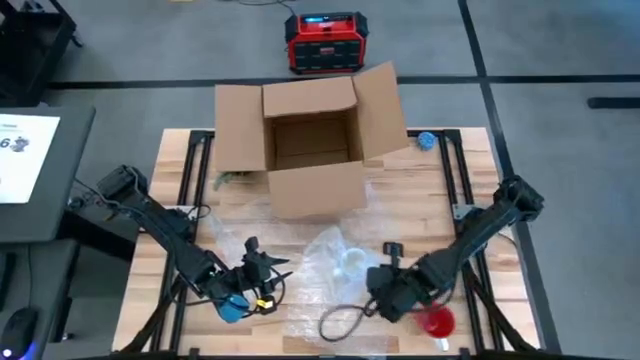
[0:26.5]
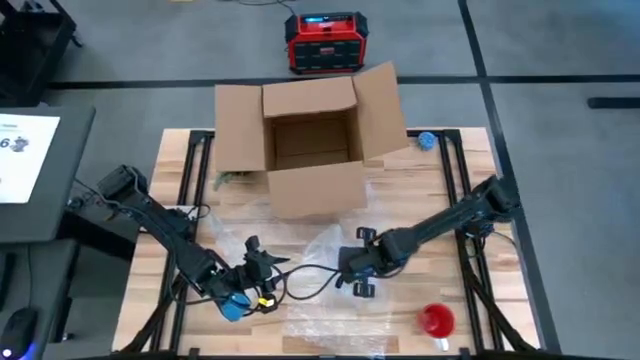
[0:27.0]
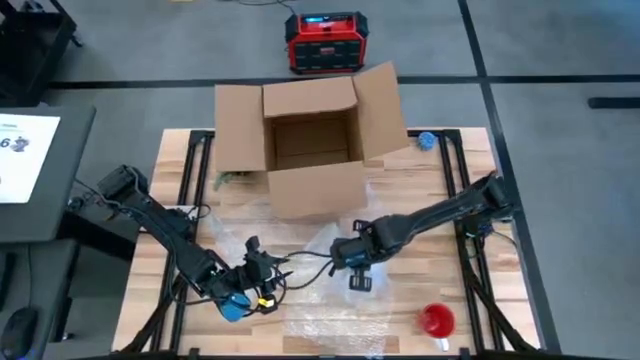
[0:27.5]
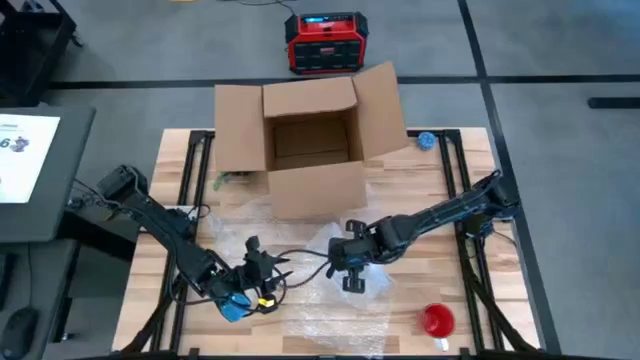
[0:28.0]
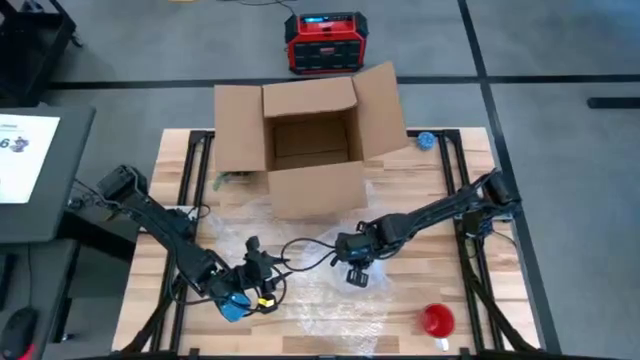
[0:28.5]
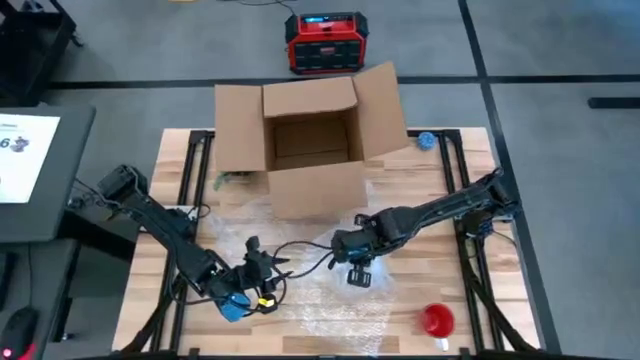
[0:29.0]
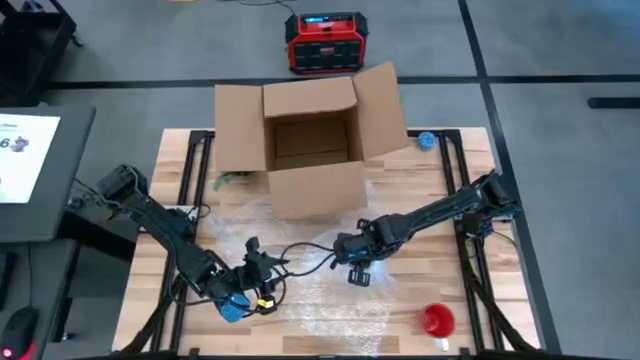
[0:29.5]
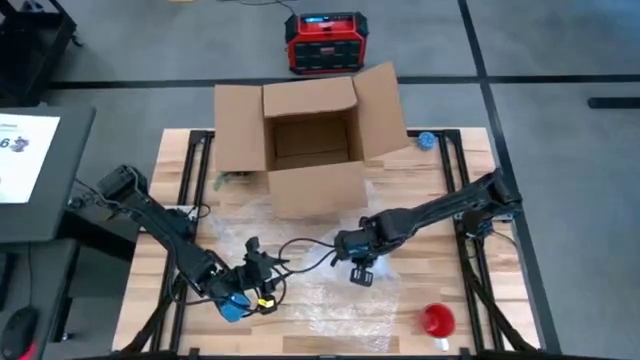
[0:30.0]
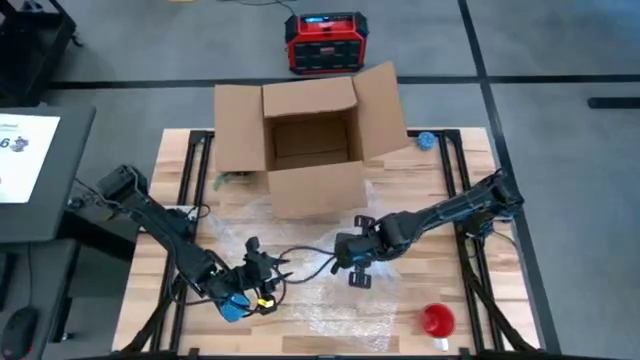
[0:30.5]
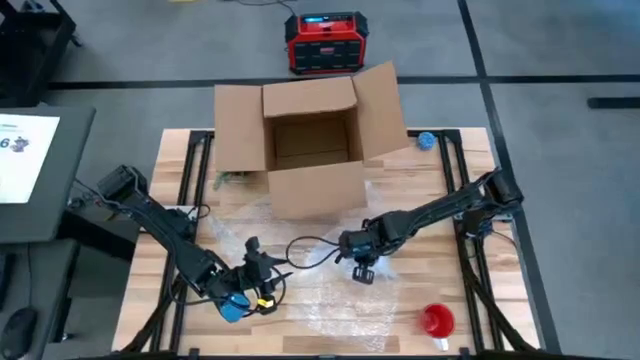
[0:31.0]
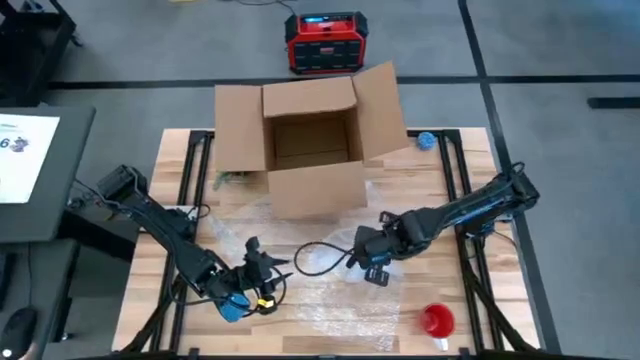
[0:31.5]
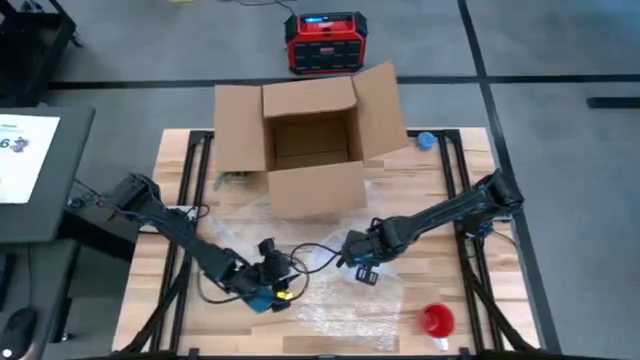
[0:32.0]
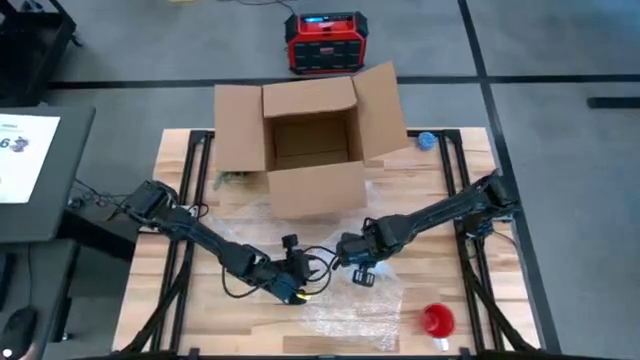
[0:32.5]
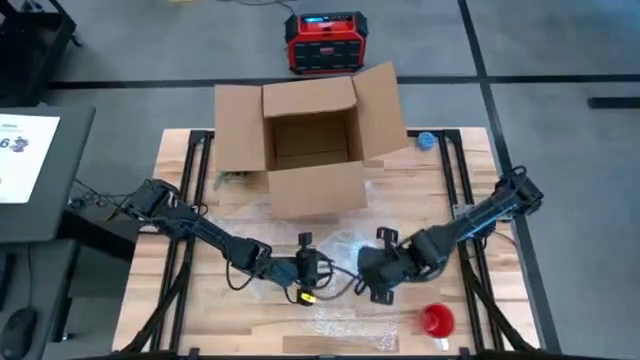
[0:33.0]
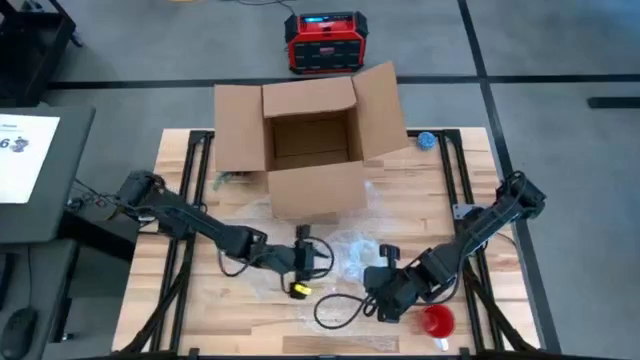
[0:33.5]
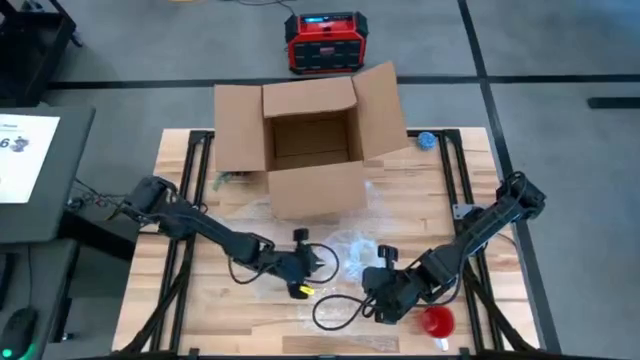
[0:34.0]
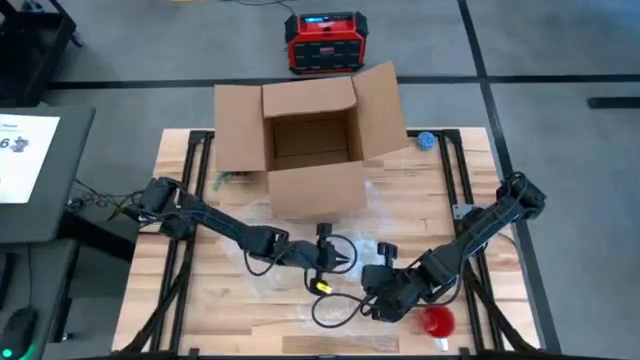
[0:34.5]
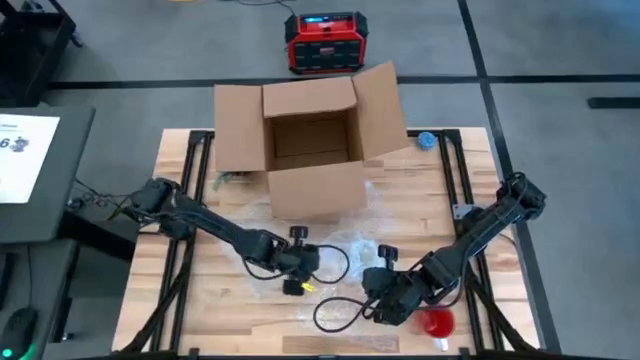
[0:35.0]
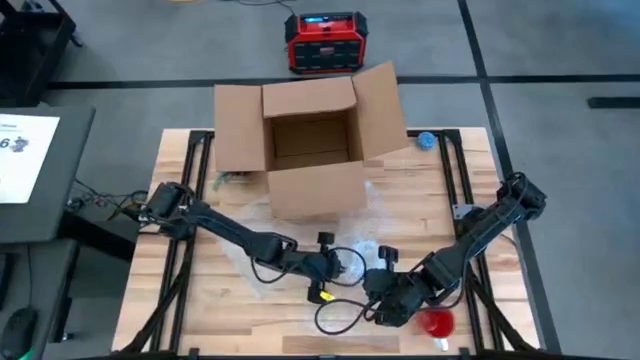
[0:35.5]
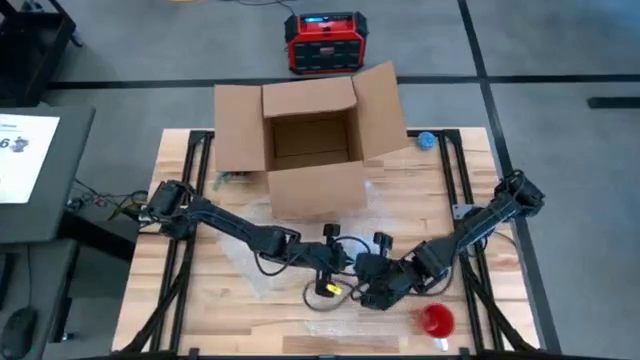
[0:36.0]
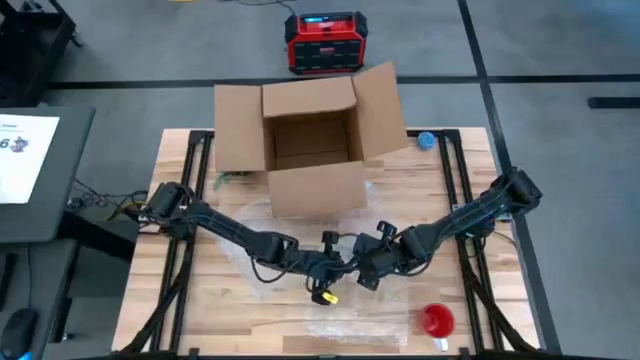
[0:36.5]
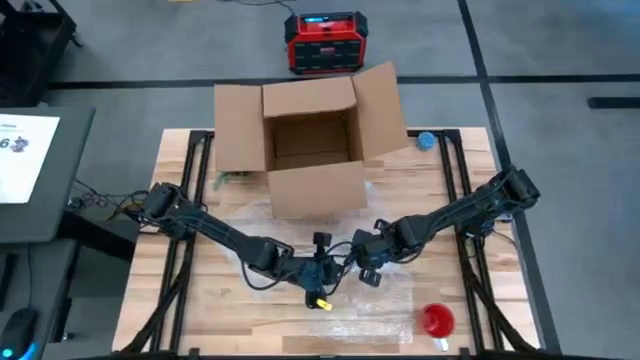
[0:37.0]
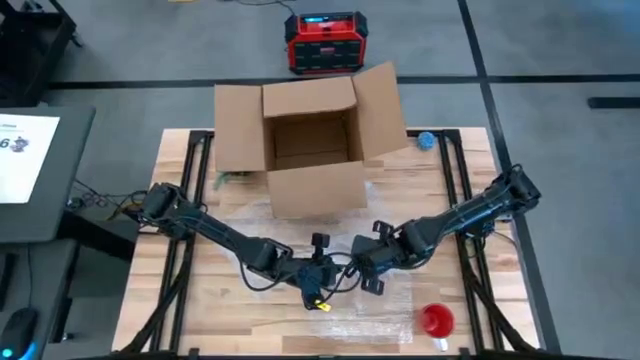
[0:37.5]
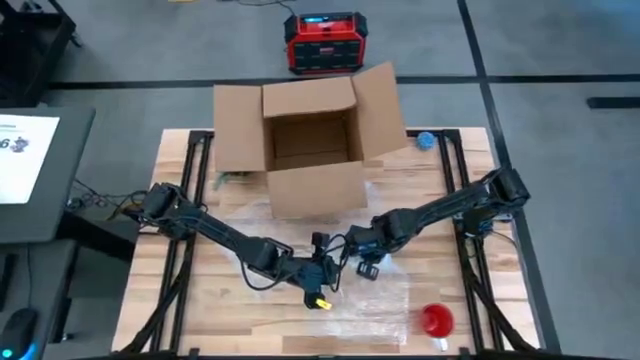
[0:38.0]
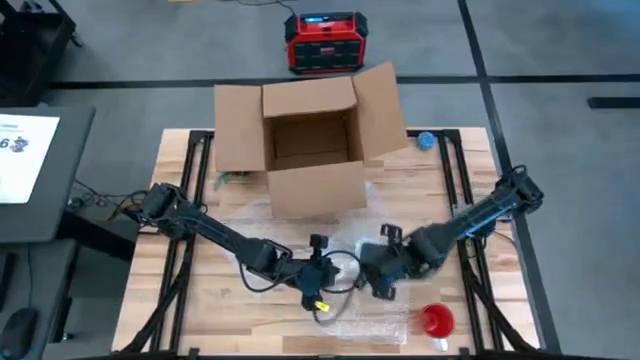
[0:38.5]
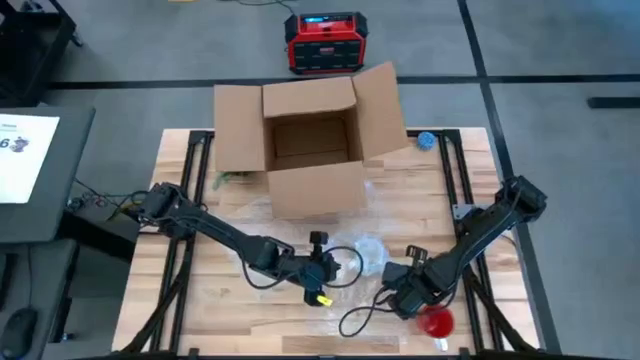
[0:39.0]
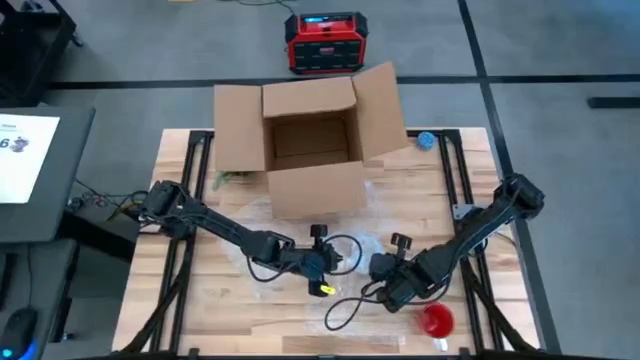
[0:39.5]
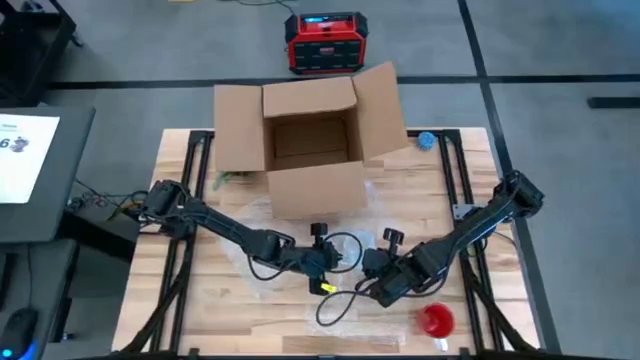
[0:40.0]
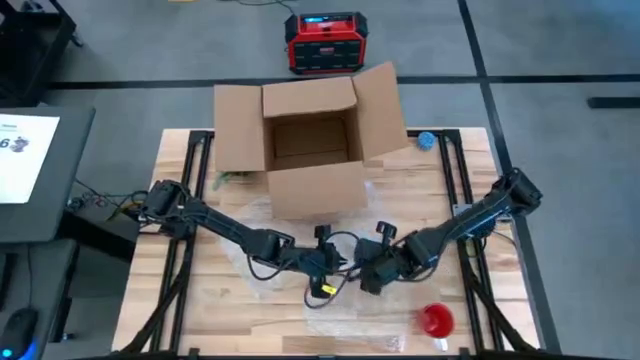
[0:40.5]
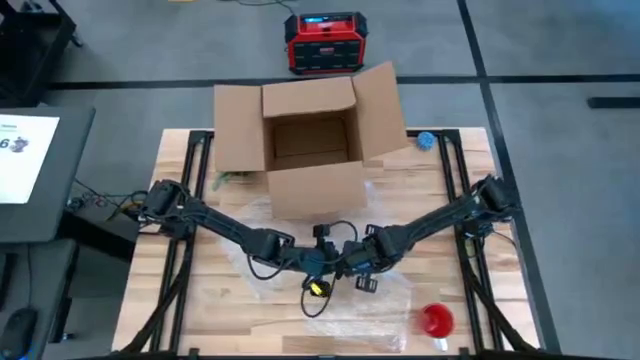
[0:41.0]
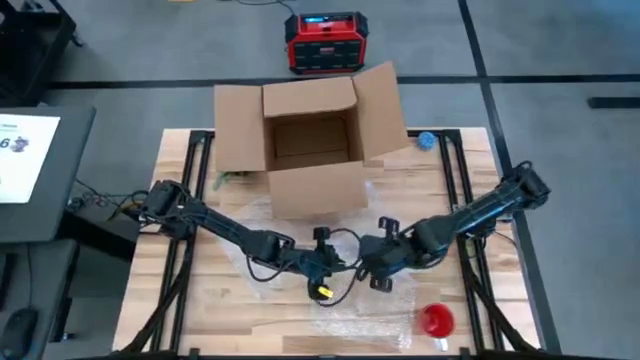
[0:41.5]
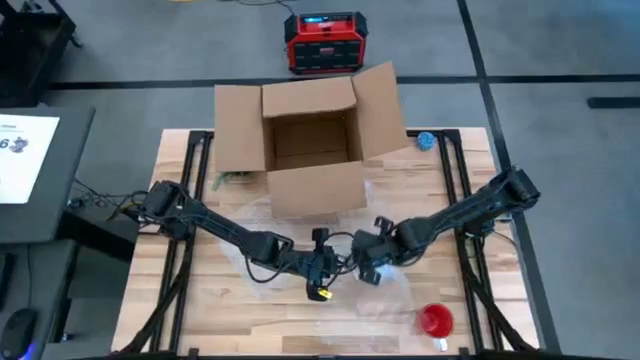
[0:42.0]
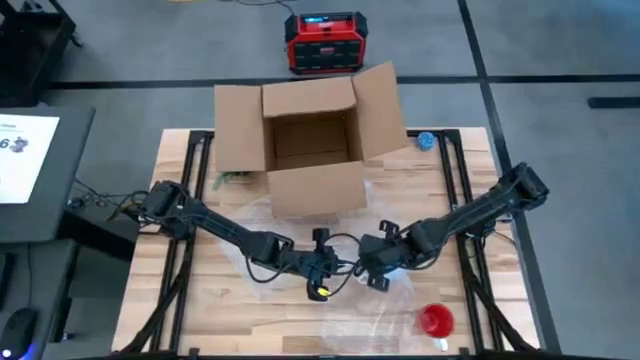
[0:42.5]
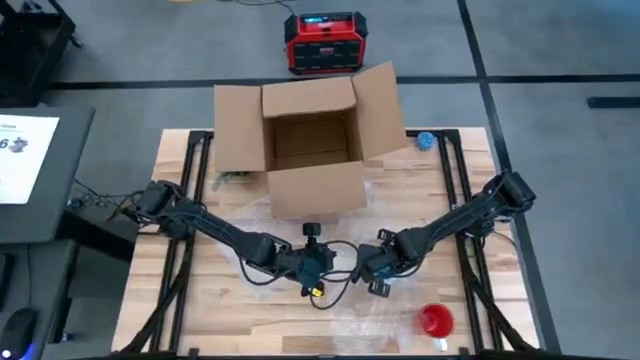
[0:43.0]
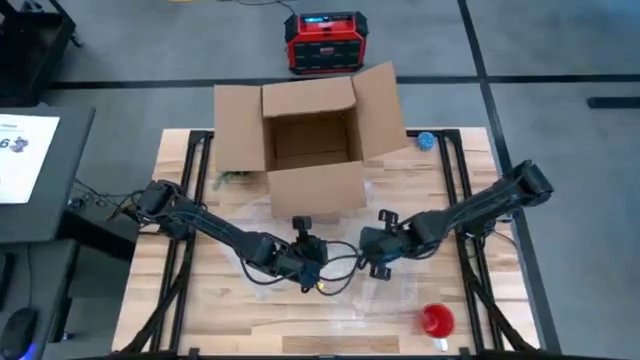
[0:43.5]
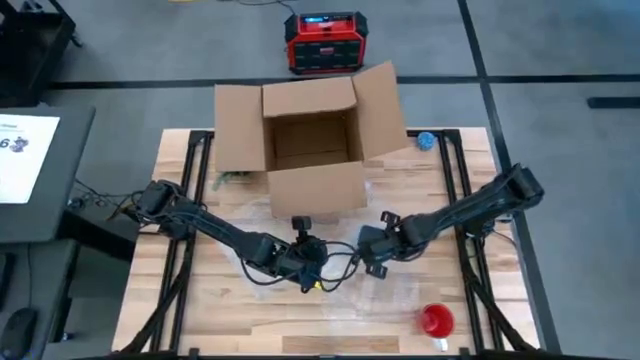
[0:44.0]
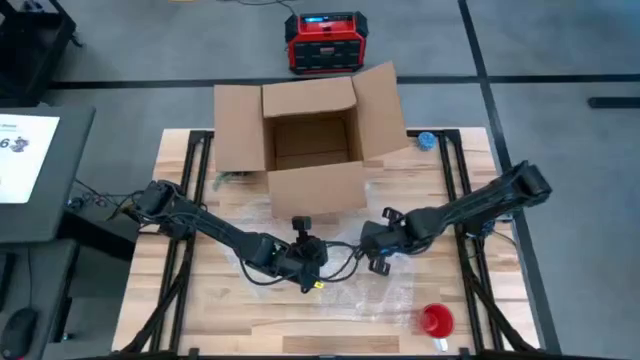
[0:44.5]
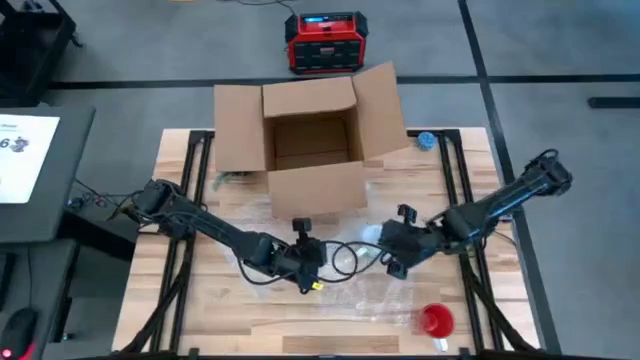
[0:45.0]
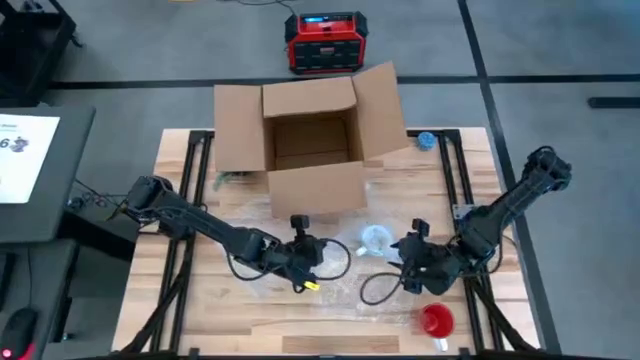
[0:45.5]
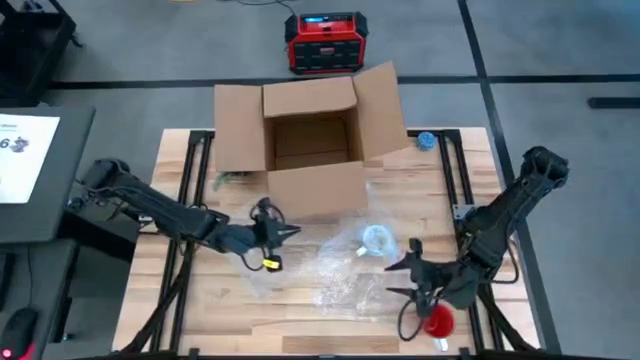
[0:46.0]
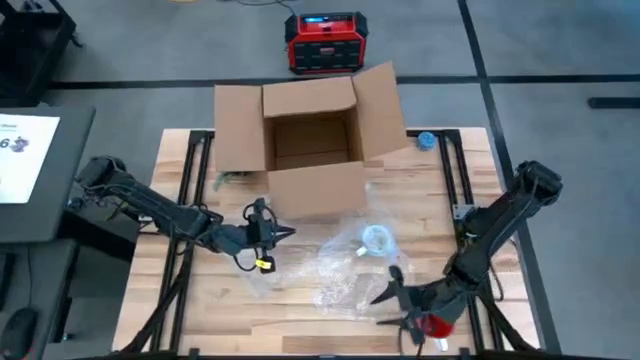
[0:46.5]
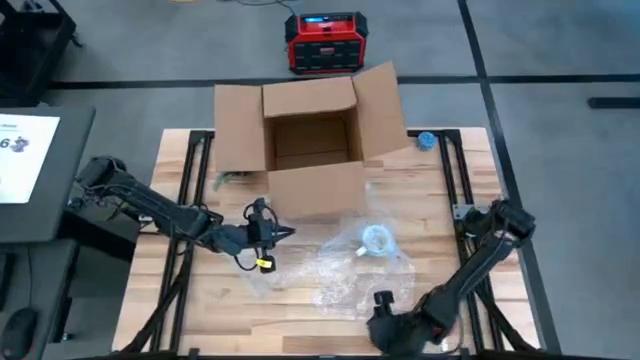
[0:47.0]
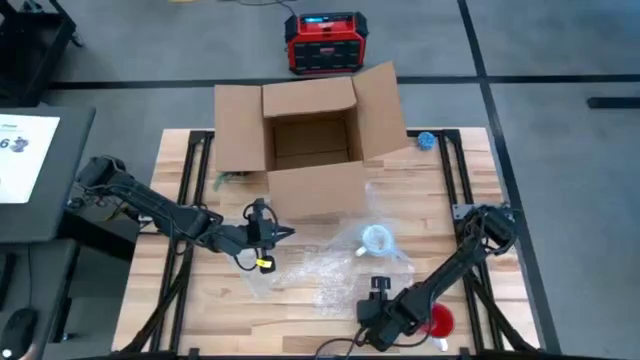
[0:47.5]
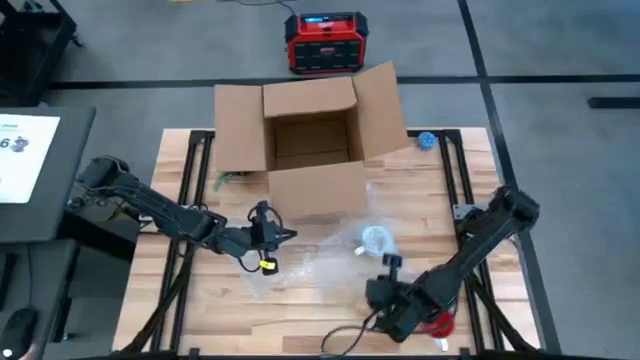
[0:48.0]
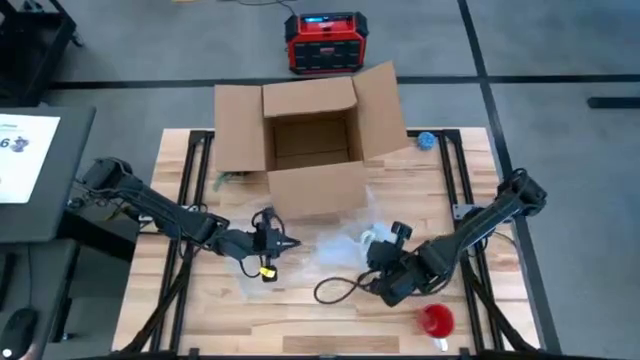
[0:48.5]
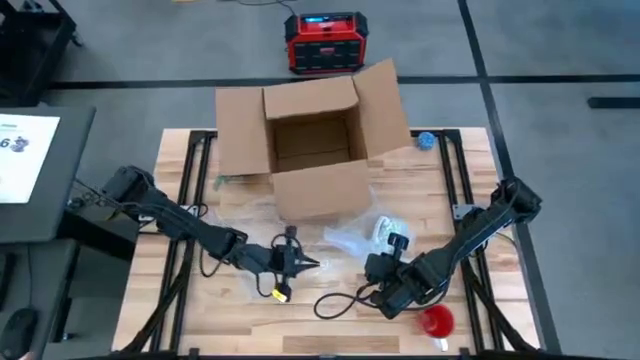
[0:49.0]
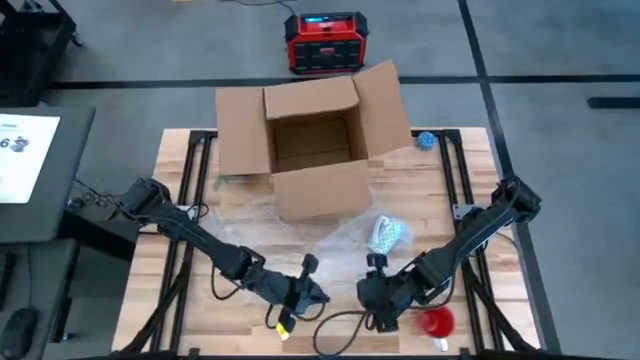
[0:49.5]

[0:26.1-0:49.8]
Task: wrap mug
Wrap the green patterned mug into the bubble wrap
